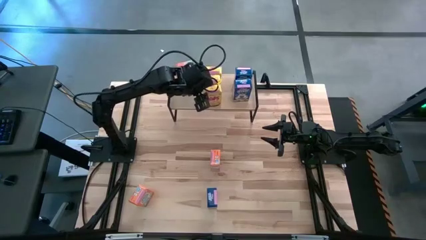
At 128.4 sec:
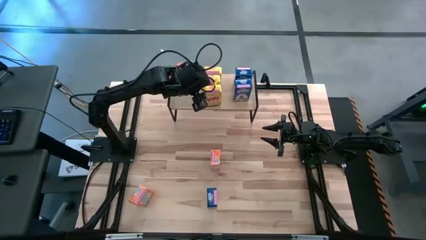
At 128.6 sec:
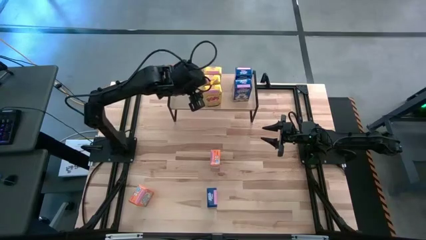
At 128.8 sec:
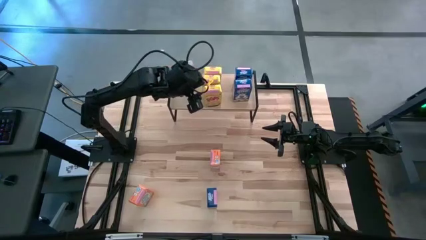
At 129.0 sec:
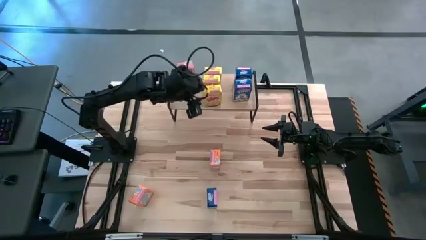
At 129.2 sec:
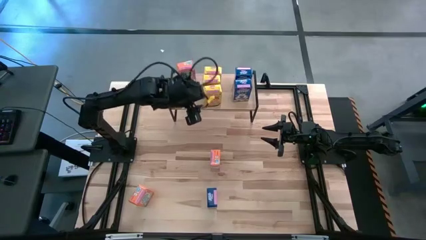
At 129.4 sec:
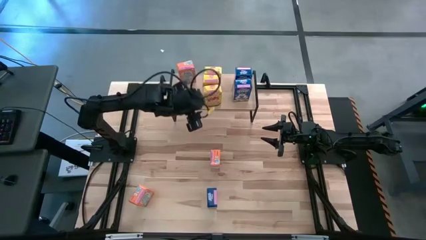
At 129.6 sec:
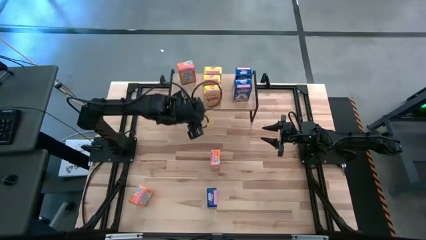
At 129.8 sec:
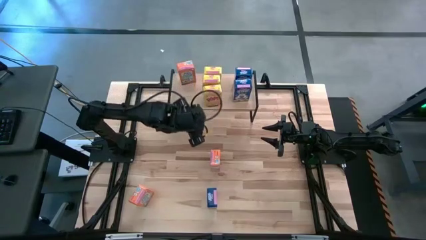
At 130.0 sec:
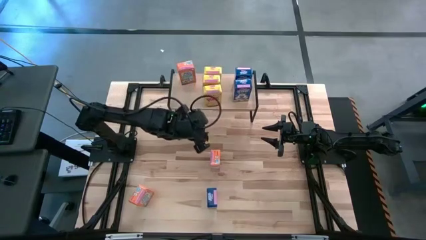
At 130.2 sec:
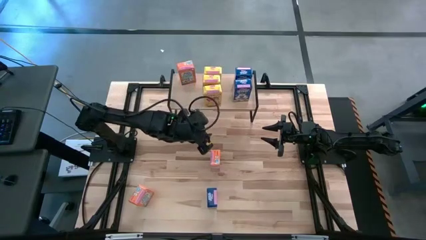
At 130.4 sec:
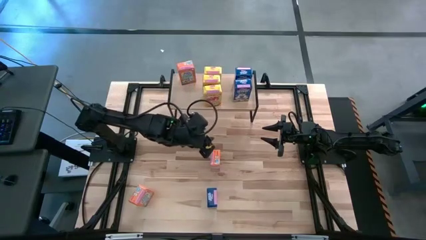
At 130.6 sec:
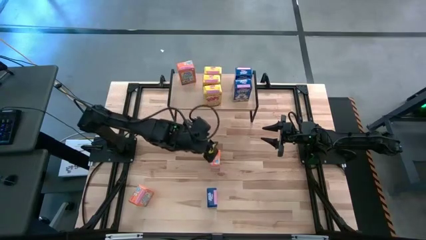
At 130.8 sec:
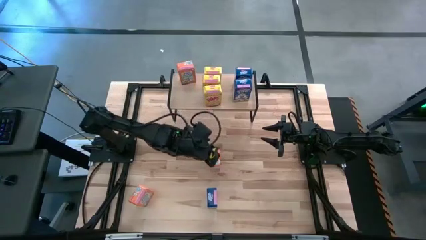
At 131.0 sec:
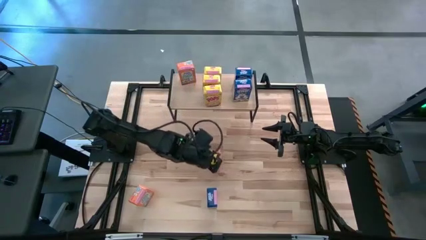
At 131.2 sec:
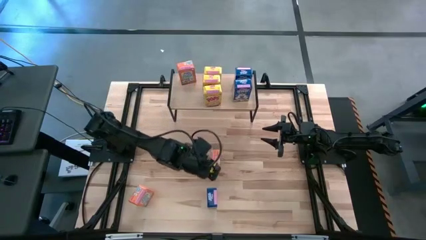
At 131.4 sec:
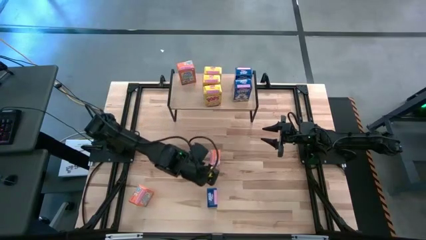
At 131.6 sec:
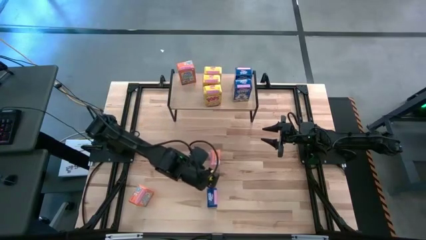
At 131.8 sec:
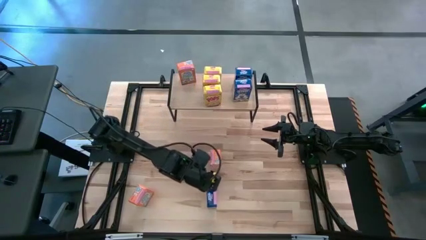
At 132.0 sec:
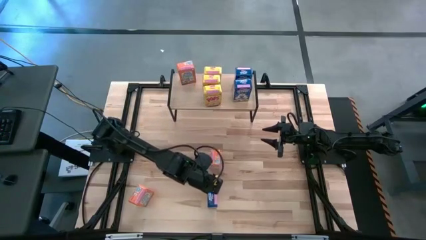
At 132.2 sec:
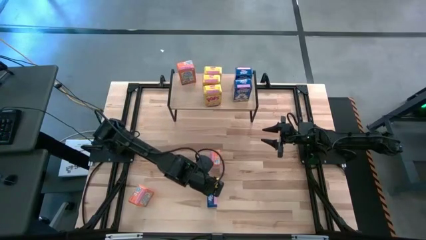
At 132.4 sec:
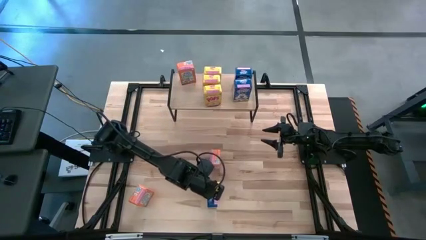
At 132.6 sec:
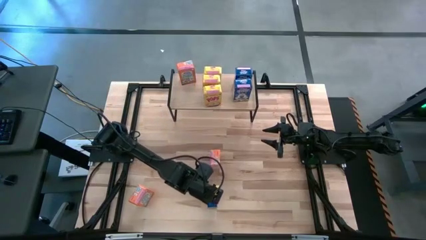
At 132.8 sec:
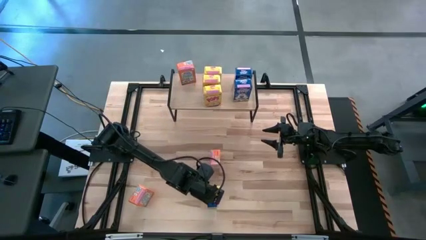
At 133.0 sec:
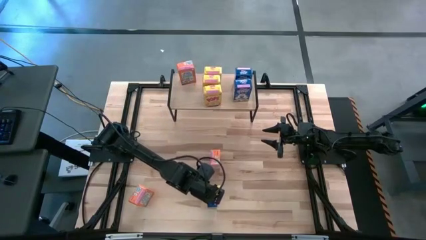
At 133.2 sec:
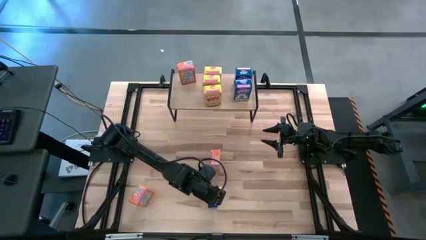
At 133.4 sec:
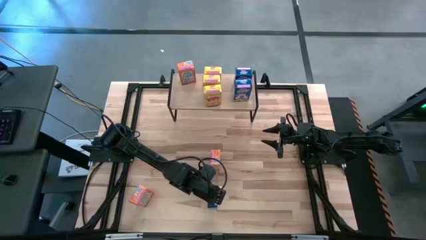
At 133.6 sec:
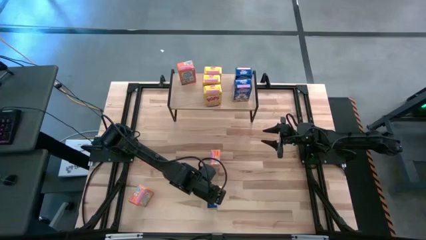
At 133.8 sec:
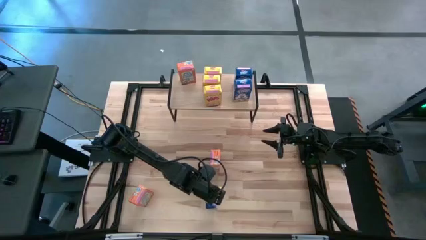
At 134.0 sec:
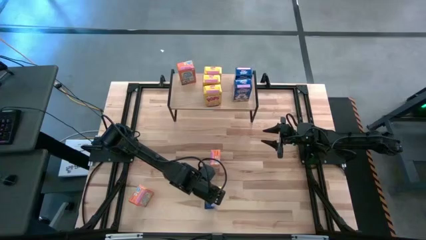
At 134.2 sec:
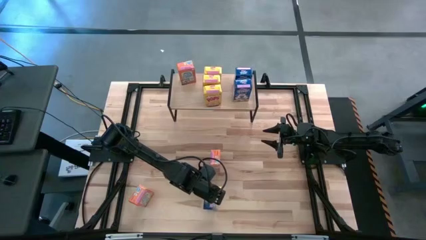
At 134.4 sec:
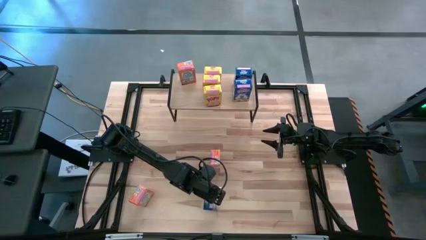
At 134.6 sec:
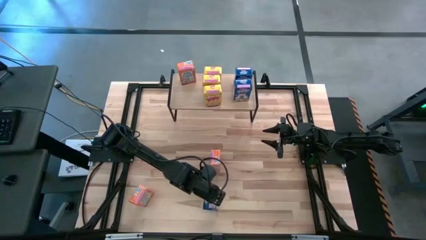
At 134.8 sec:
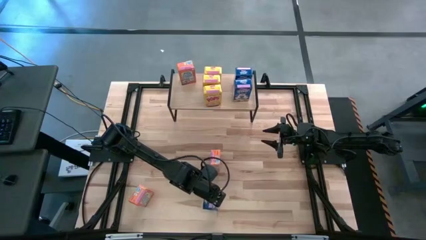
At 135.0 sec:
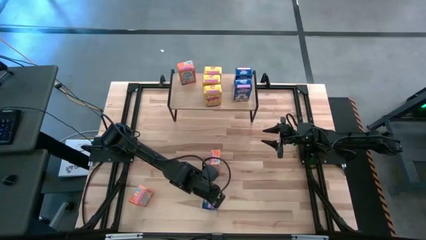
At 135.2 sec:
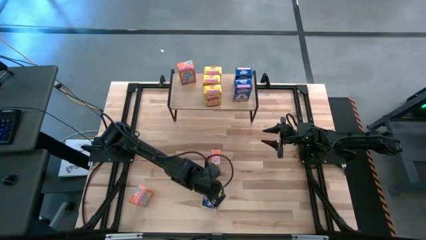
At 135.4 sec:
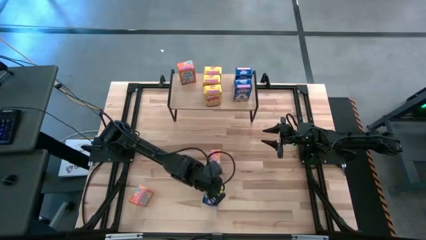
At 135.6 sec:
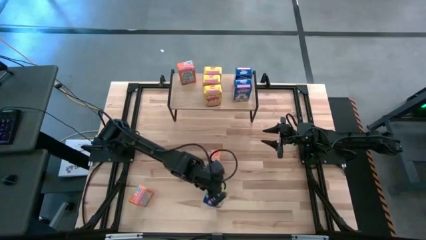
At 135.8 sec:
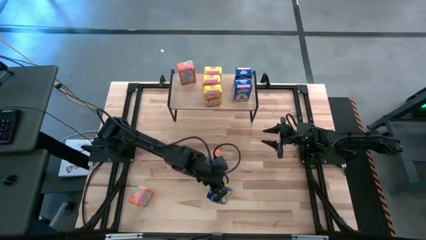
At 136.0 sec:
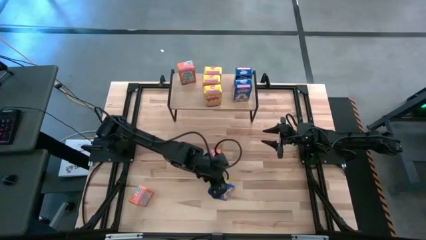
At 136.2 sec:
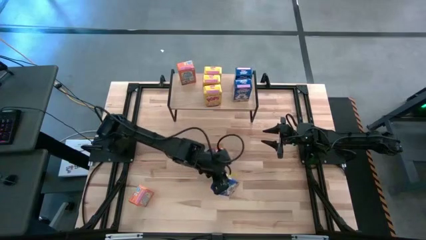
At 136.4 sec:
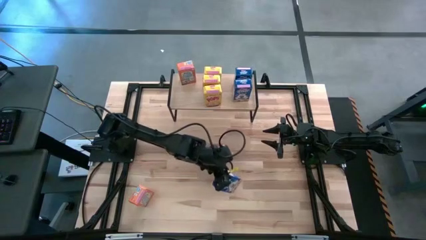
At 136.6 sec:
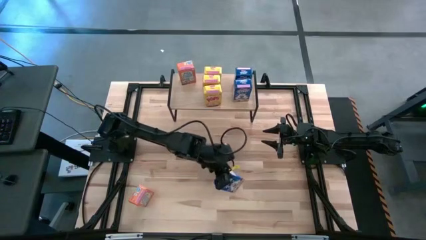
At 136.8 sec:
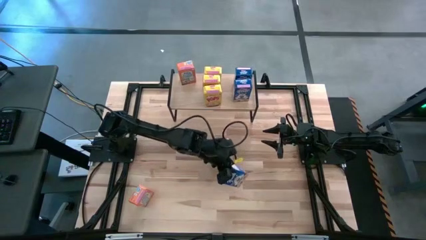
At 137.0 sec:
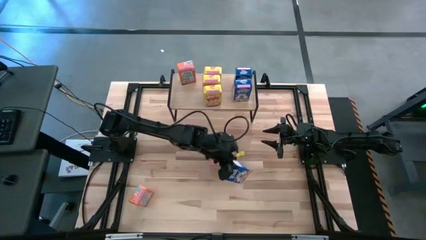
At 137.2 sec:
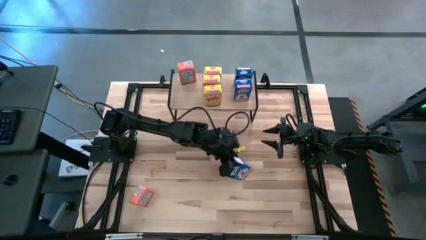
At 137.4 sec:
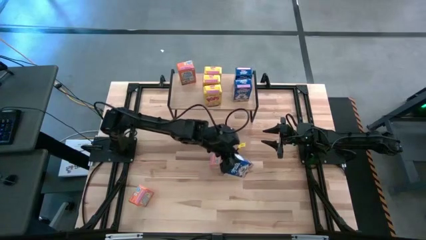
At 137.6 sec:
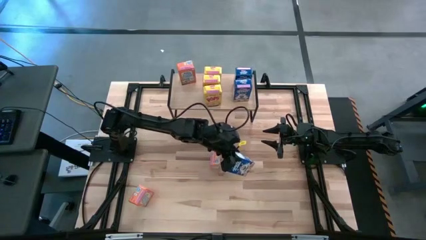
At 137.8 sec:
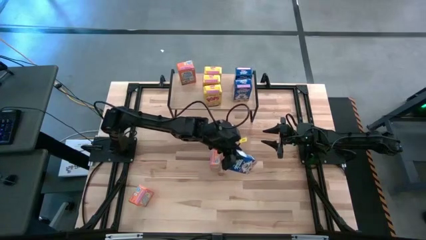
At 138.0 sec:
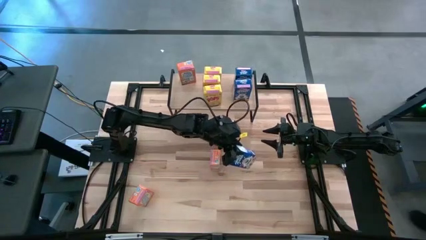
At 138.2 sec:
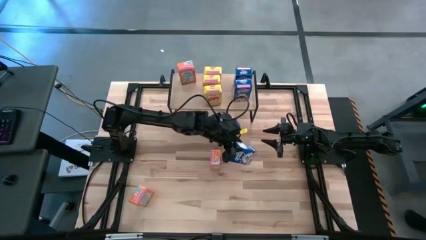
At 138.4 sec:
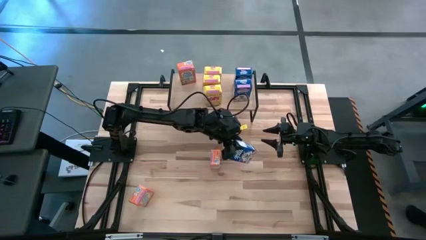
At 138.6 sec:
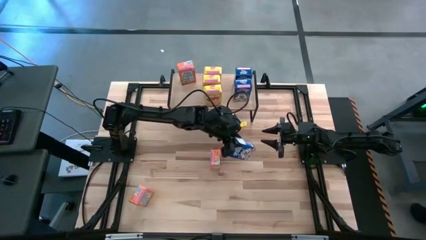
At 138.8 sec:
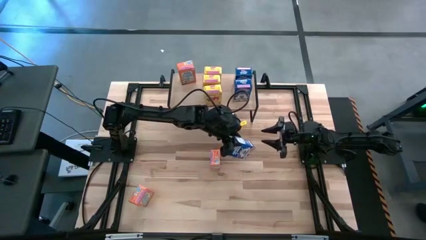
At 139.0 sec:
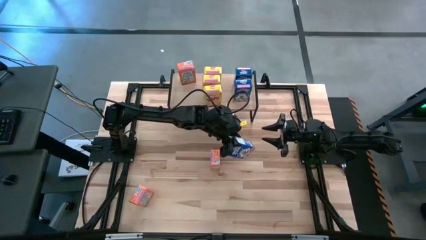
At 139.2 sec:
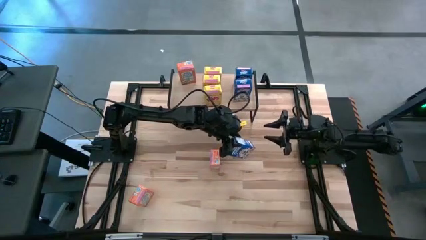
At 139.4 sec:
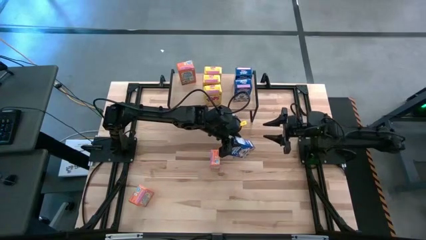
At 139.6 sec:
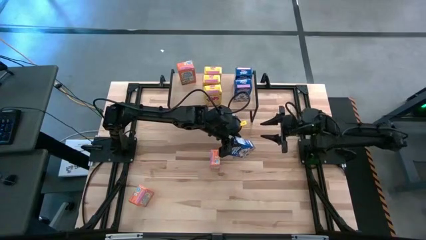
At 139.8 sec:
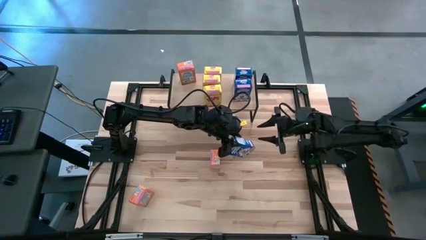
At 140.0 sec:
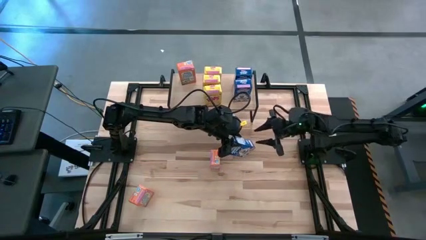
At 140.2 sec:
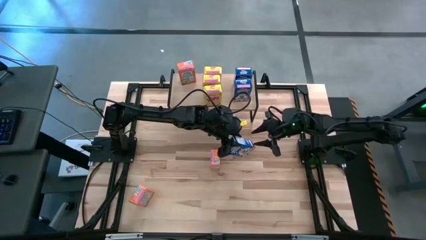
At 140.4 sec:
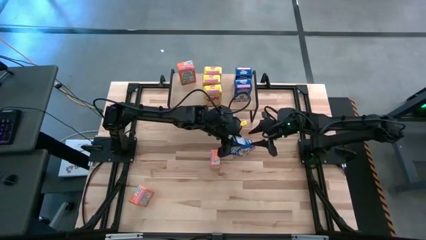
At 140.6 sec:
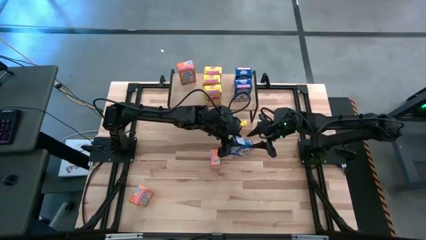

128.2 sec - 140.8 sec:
Task: Stack cereal on shelf
Put the blue cereal box on the shelf aligned with the other blue cereal boxes
